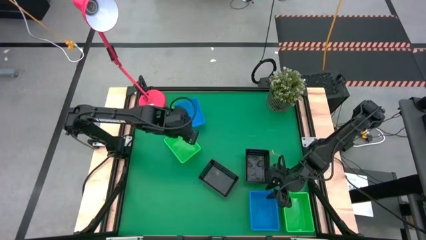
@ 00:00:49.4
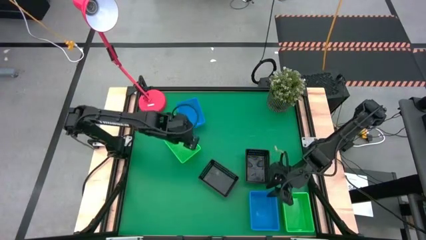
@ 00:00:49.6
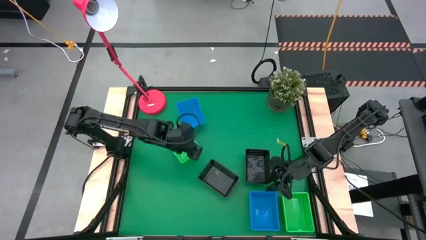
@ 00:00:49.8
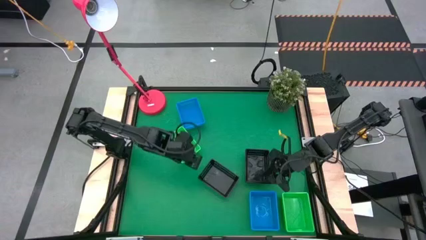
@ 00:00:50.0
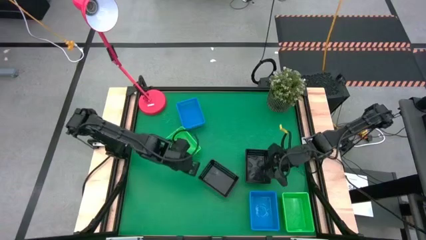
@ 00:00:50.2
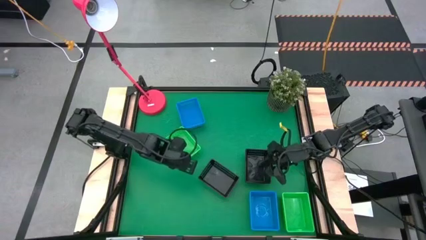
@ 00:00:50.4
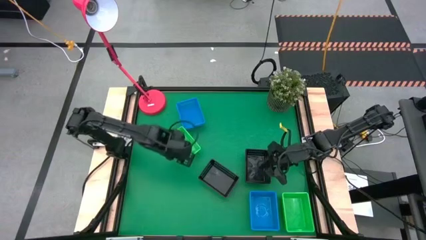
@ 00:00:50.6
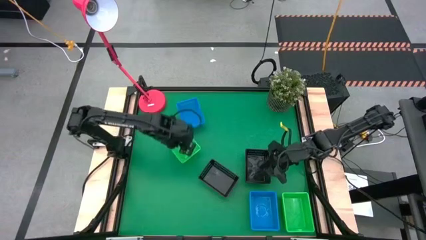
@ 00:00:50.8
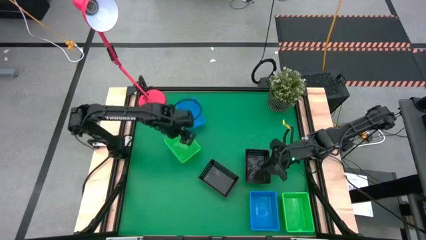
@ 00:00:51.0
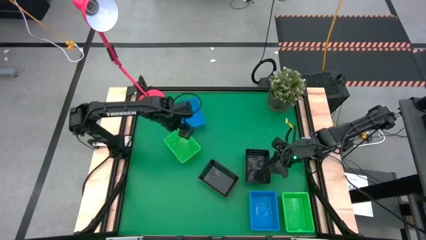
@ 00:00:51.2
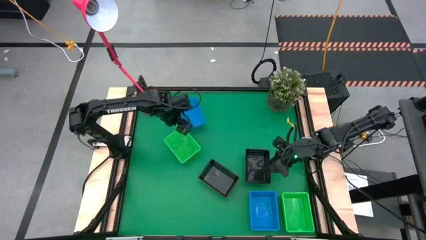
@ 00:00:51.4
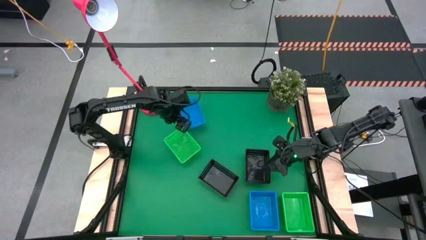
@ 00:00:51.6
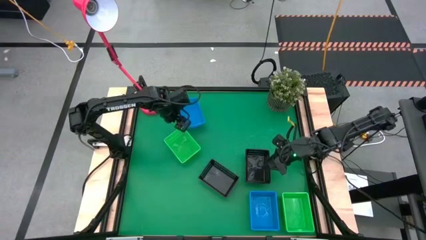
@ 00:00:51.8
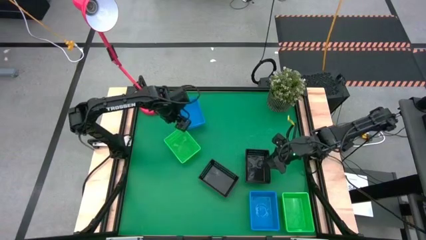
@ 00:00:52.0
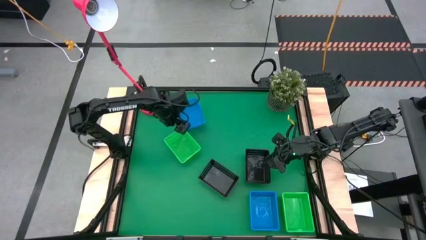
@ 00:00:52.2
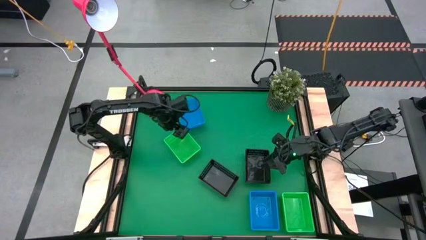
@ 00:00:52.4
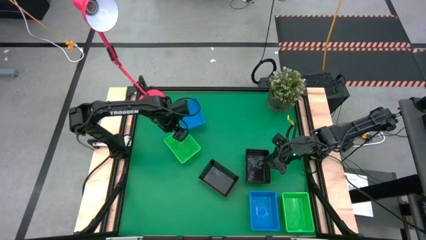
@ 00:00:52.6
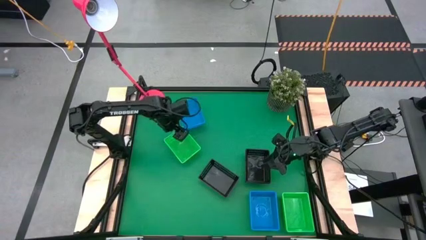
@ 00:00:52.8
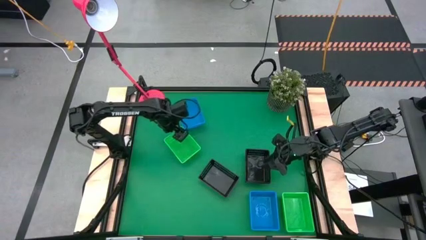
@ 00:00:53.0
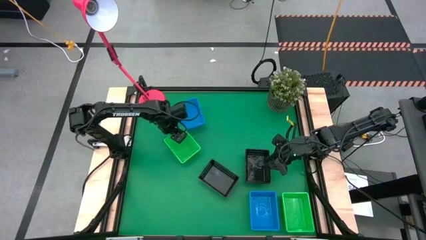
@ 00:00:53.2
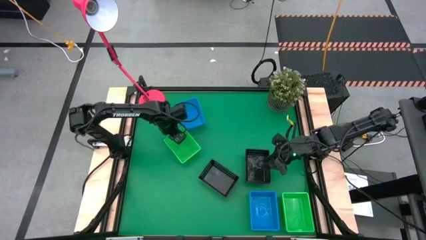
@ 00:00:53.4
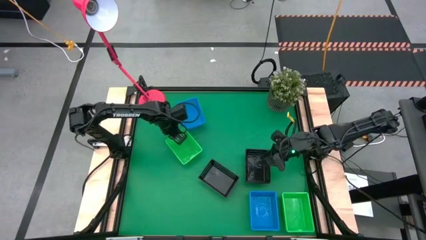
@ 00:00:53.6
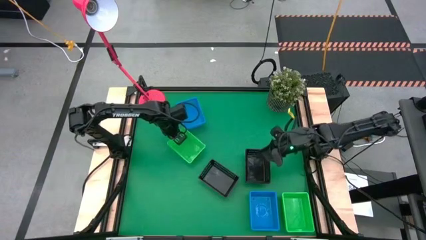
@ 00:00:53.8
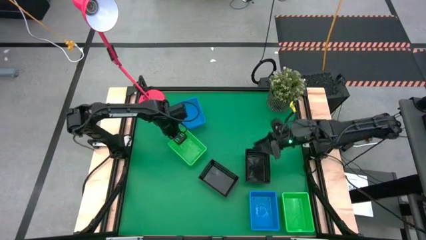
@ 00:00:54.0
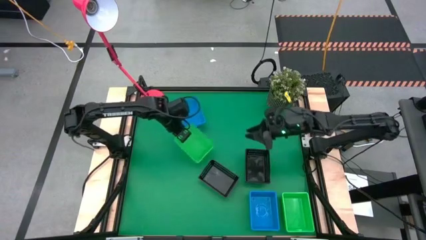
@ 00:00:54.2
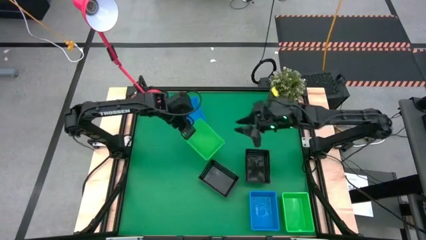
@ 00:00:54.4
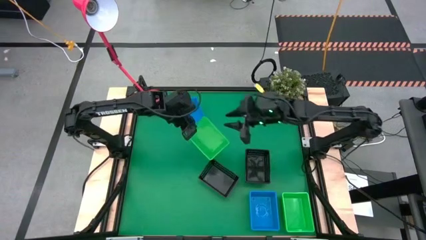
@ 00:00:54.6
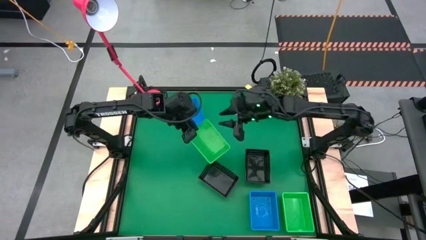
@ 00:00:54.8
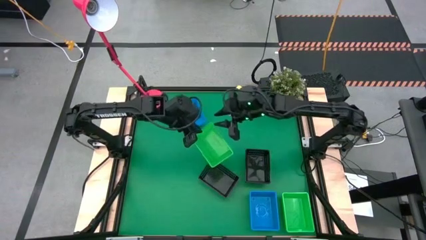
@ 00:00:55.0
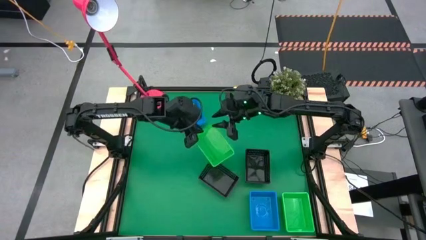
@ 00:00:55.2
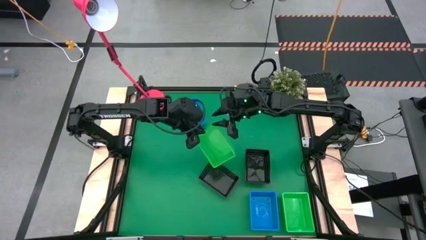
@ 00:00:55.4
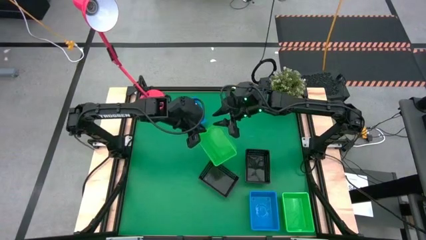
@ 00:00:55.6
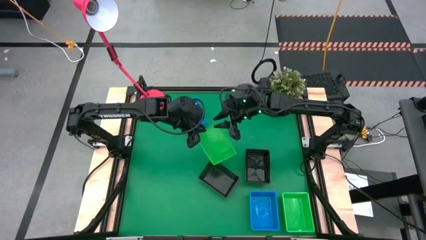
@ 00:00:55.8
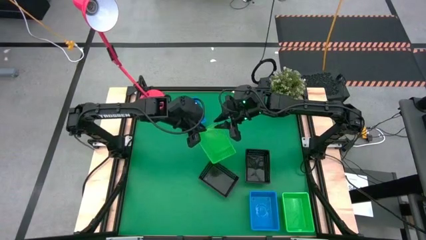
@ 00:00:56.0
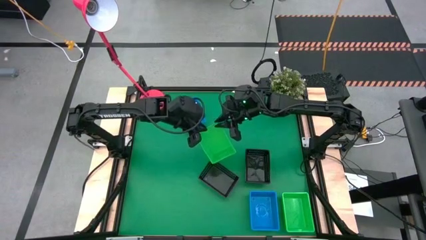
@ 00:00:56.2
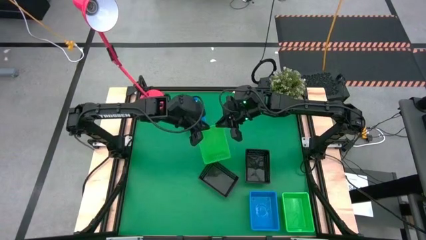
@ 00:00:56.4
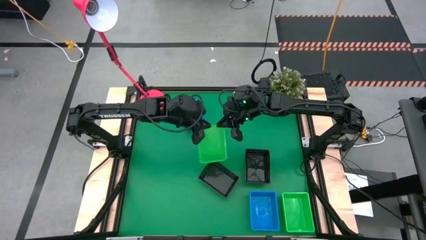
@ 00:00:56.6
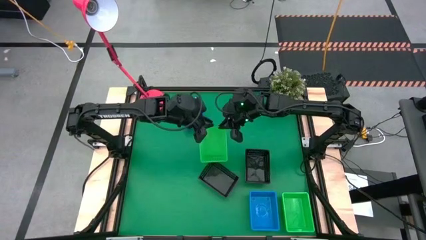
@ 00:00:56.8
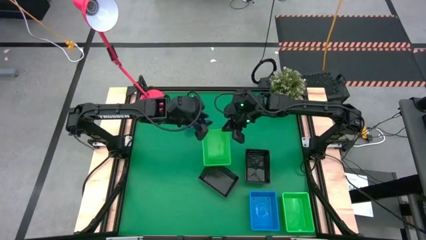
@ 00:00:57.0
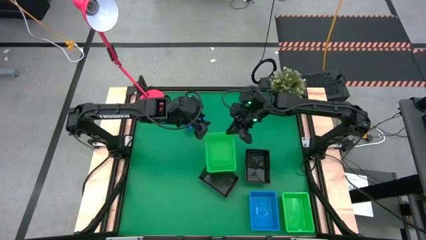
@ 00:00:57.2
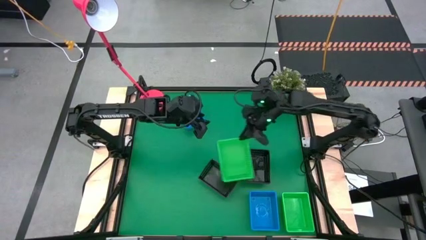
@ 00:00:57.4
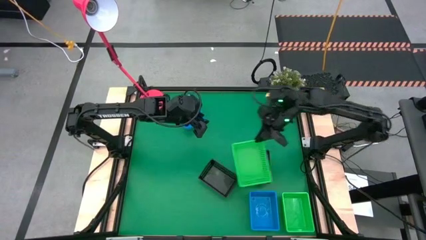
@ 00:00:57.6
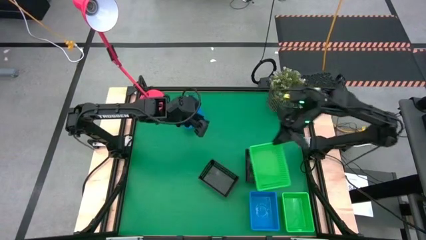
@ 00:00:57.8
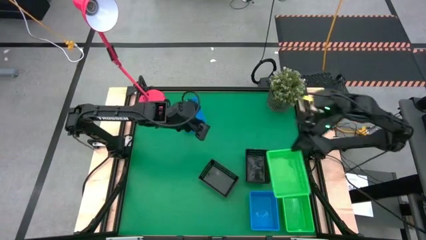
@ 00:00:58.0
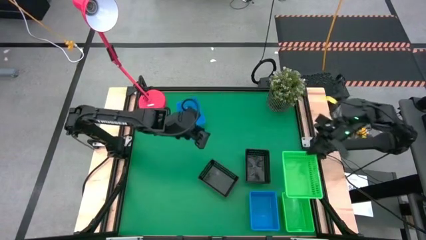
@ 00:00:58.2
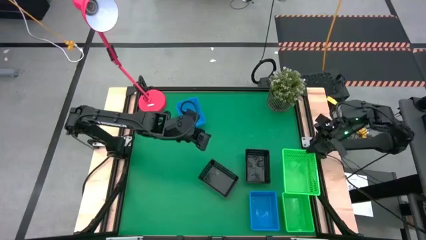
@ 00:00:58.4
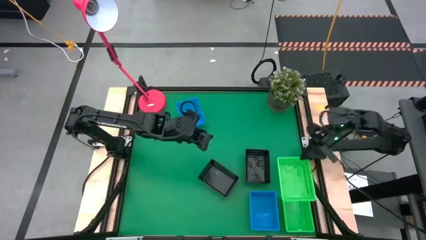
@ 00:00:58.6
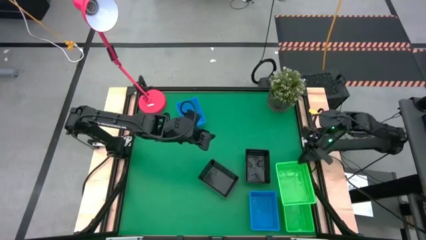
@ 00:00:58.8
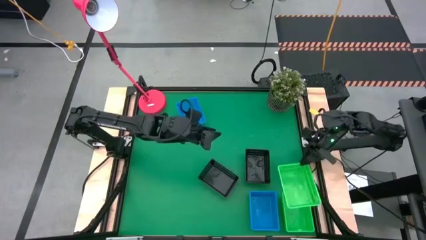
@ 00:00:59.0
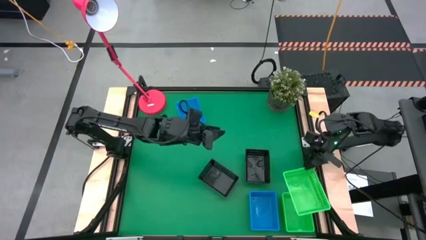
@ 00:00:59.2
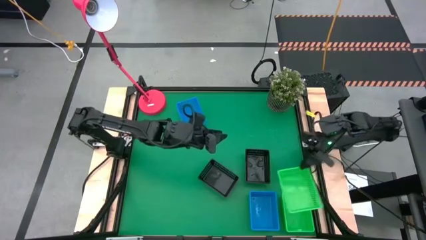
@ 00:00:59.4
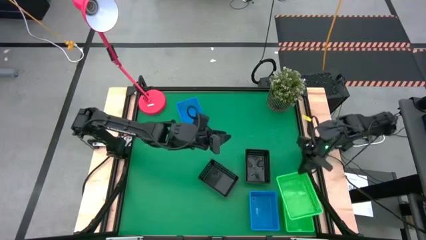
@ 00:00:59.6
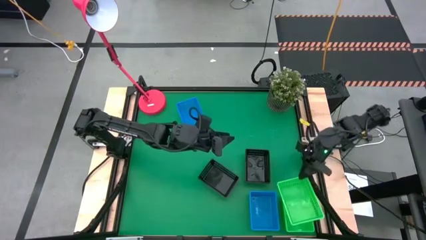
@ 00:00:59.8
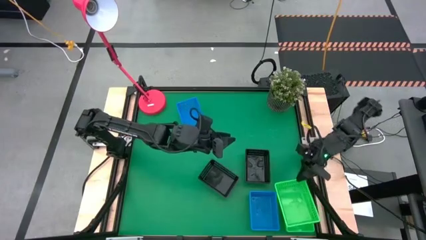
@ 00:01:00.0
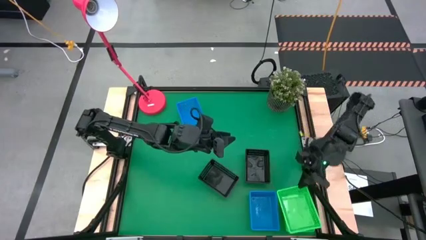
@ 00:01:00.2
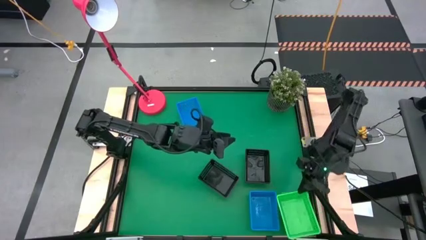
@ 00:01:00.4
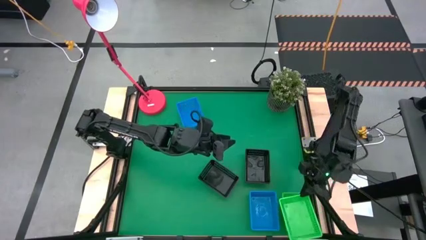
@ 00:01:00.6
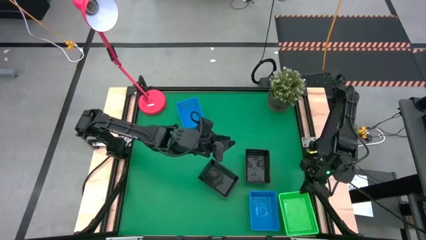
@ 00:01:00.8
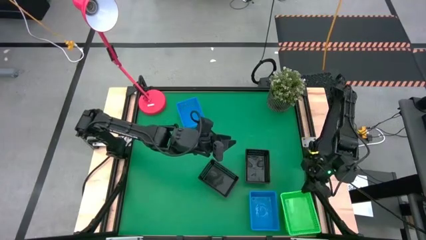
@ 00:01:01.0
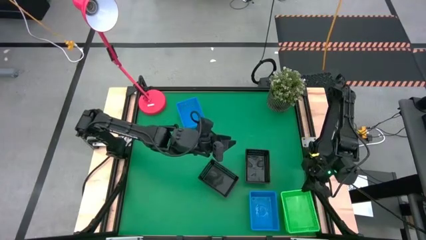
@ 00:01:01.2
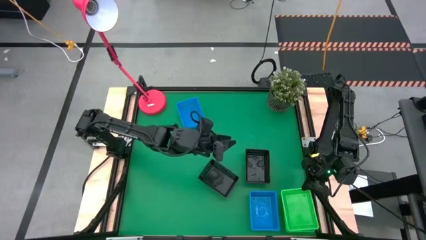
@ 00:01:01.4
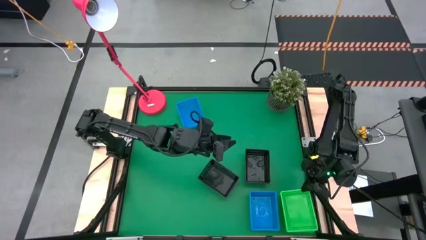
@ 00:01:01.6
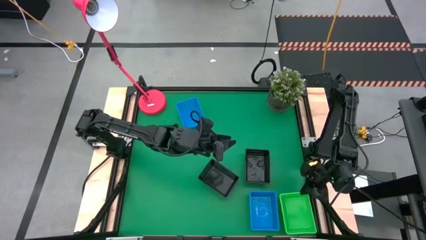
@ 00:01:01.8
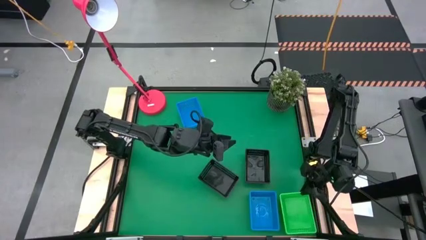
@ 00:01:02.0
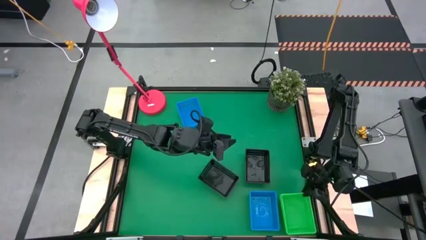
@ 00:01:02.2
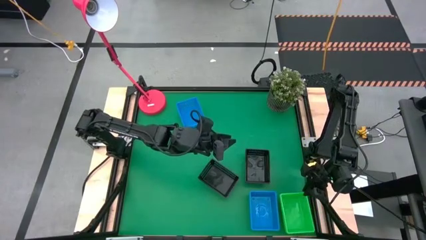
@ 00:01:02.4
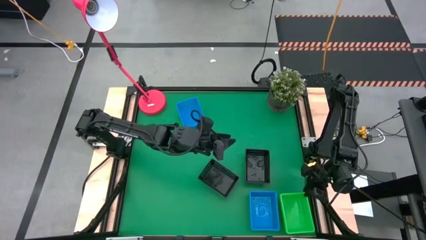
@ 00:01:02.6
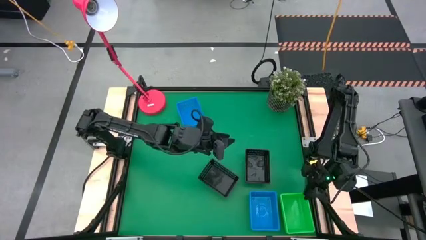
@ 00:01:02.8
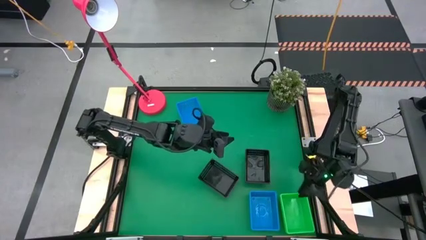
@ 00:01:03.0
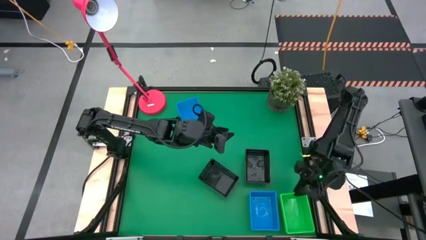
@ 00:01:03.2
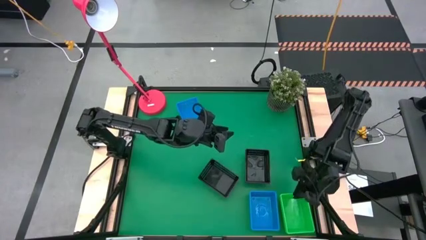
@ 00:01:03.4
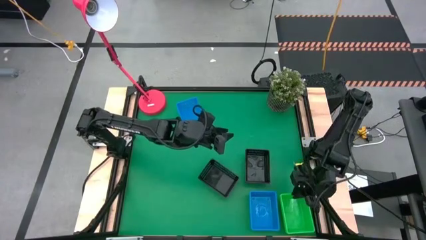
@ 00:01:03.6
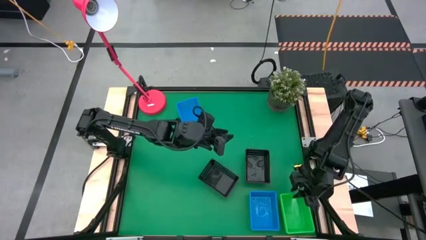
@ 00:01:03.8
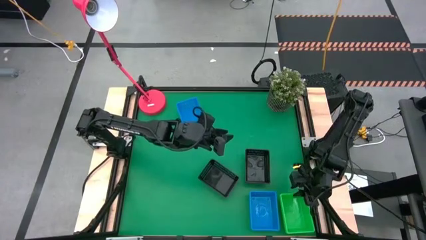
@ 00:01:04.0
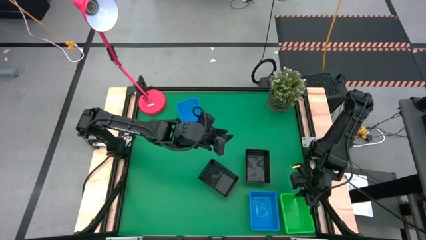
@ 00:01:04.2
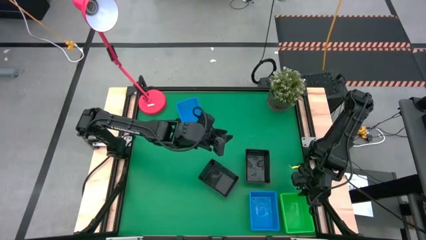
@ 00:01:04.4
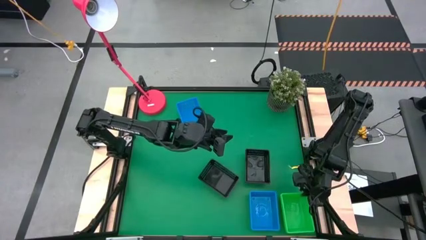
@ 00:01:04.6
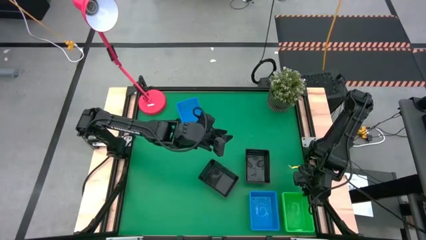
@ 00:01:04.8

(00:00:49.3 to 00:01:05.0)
Stack the top green bin on the green bins
